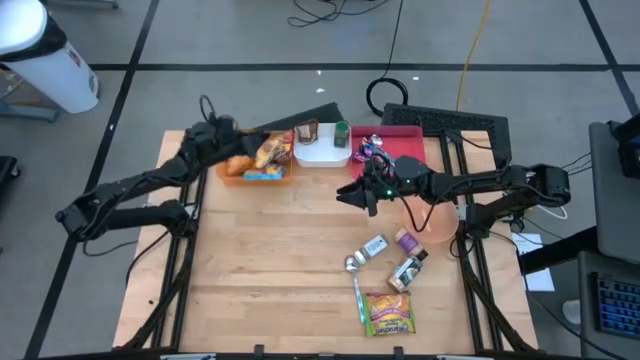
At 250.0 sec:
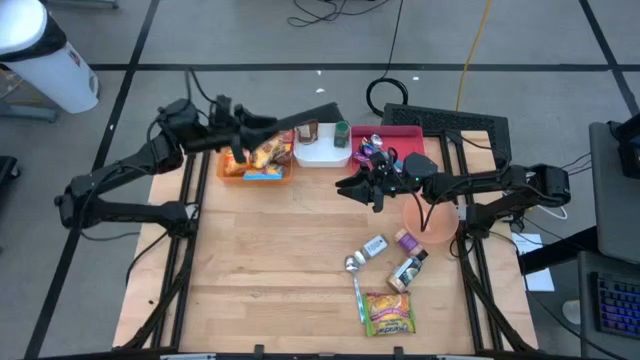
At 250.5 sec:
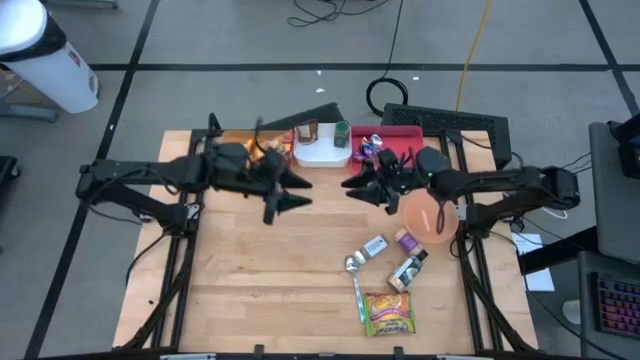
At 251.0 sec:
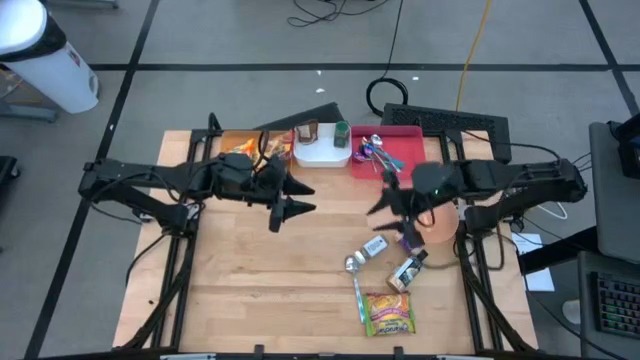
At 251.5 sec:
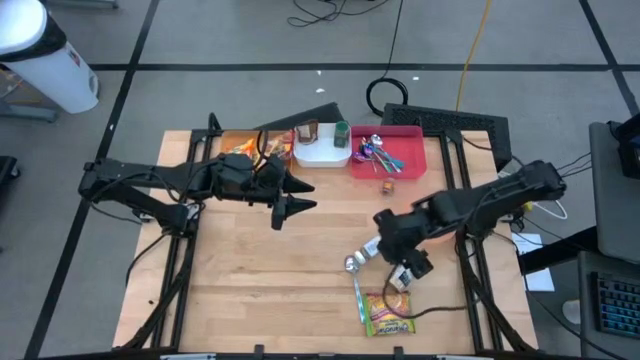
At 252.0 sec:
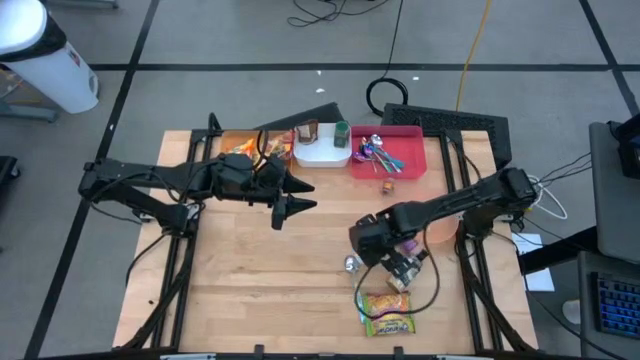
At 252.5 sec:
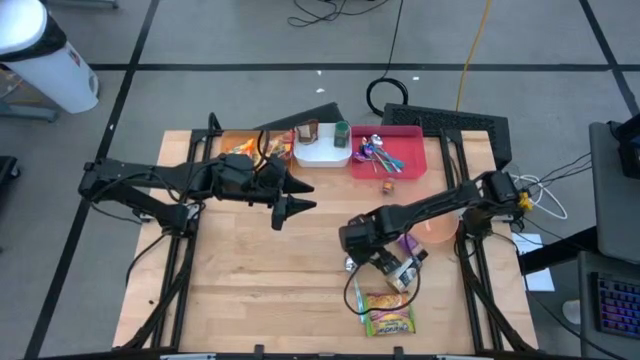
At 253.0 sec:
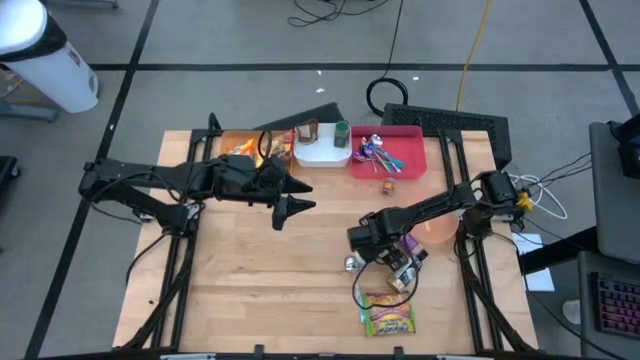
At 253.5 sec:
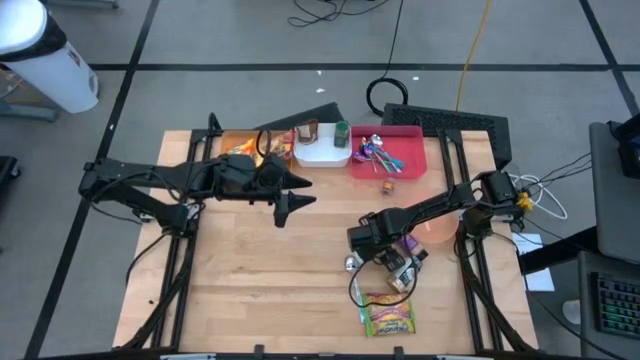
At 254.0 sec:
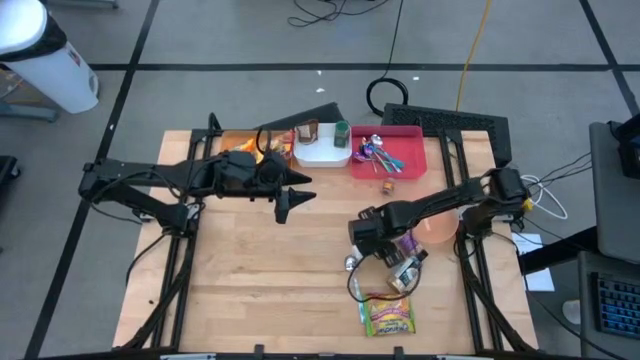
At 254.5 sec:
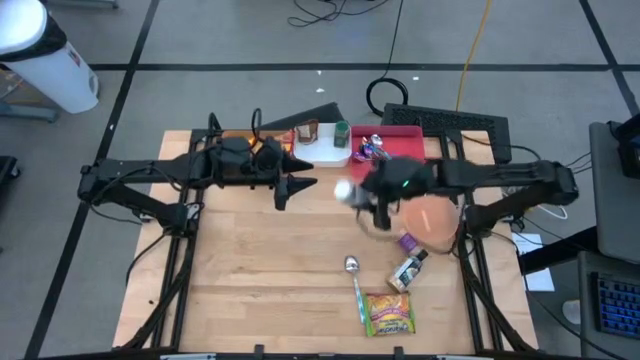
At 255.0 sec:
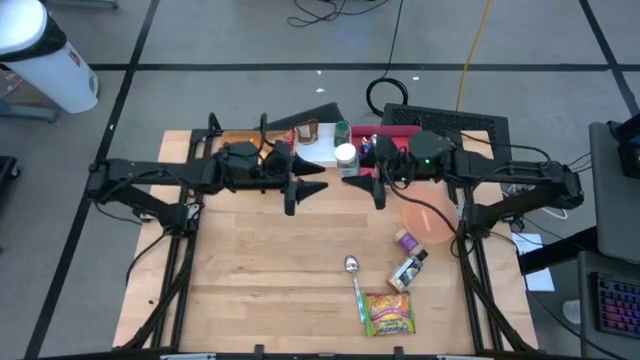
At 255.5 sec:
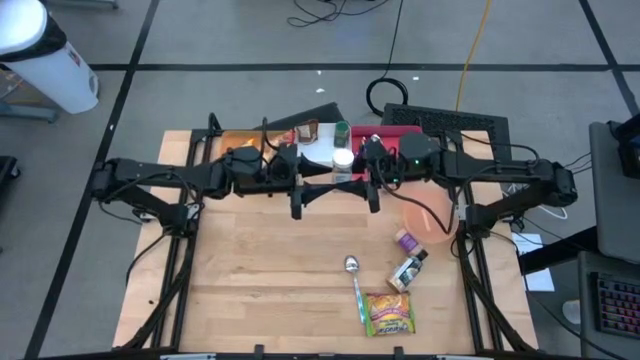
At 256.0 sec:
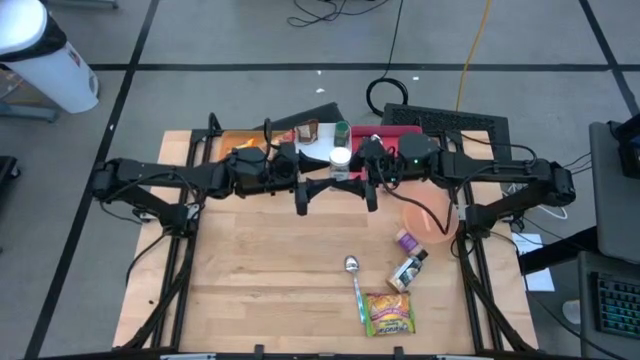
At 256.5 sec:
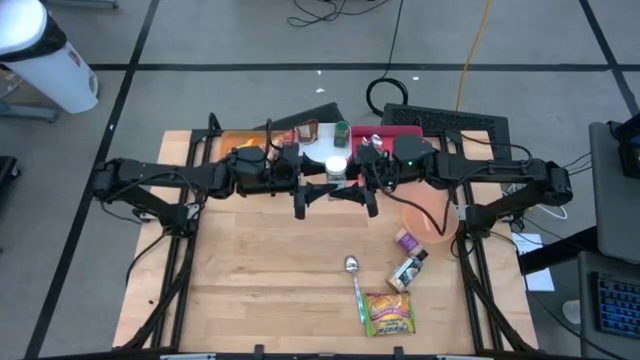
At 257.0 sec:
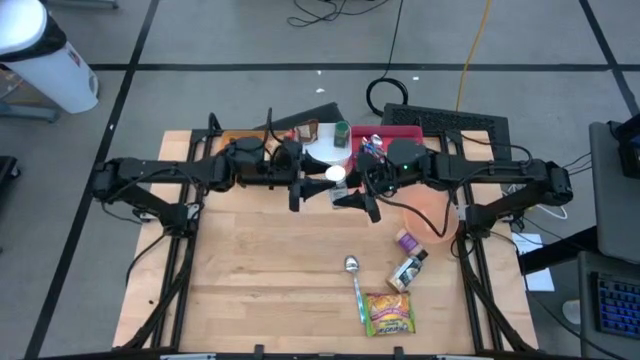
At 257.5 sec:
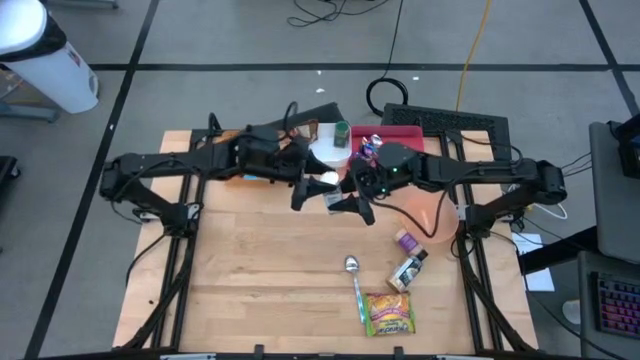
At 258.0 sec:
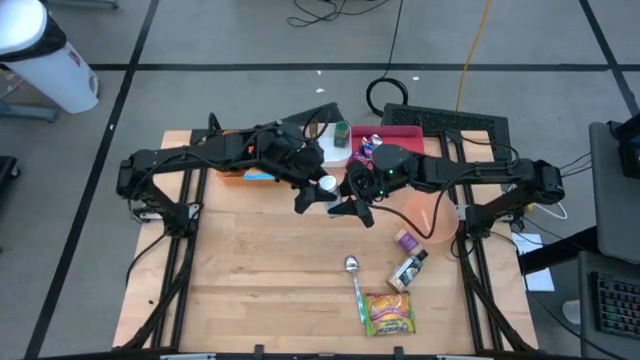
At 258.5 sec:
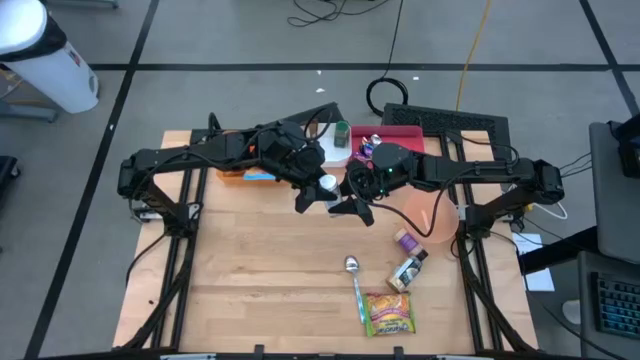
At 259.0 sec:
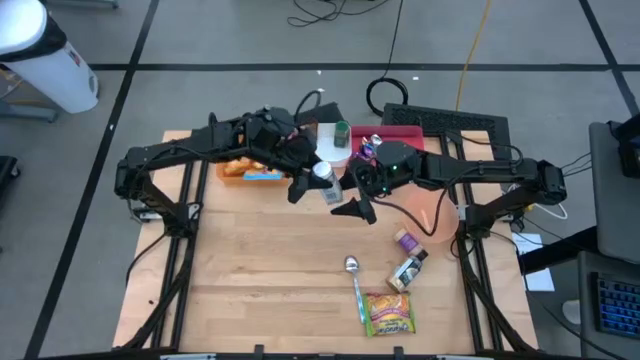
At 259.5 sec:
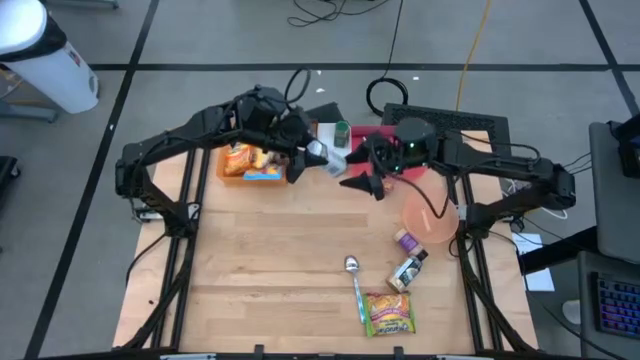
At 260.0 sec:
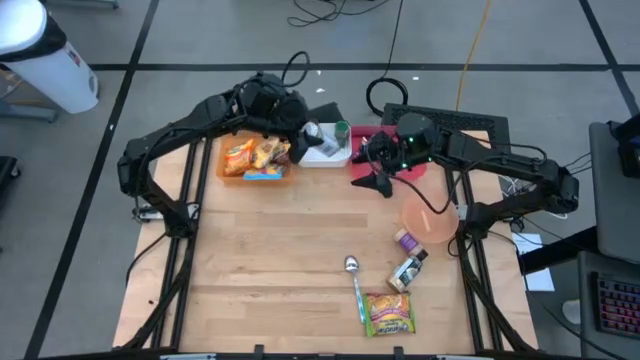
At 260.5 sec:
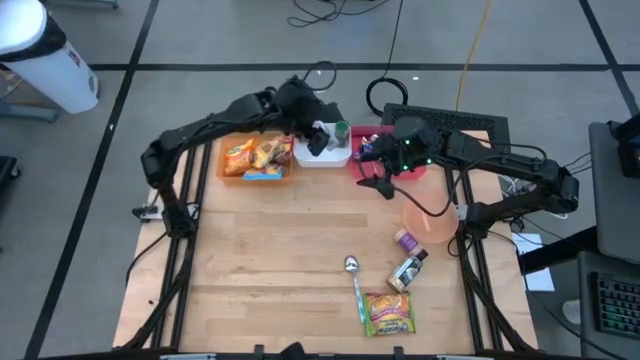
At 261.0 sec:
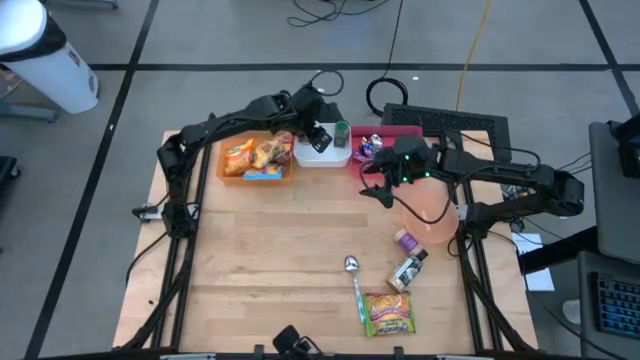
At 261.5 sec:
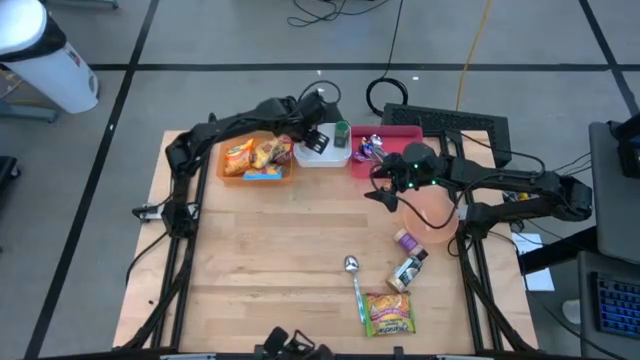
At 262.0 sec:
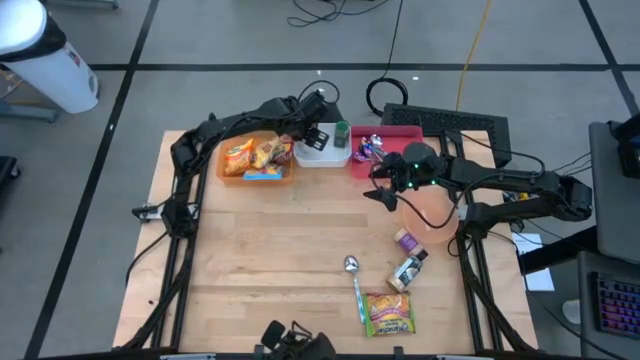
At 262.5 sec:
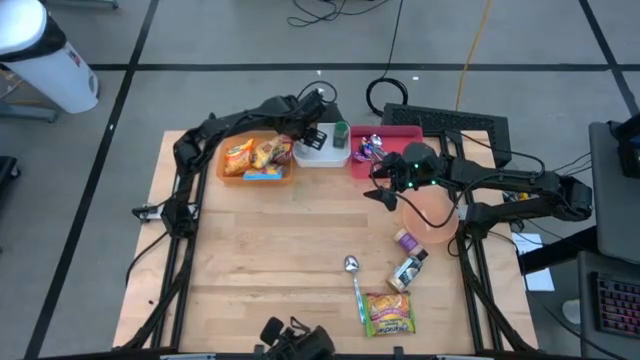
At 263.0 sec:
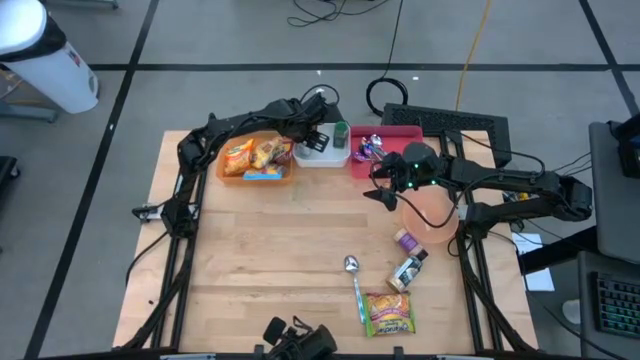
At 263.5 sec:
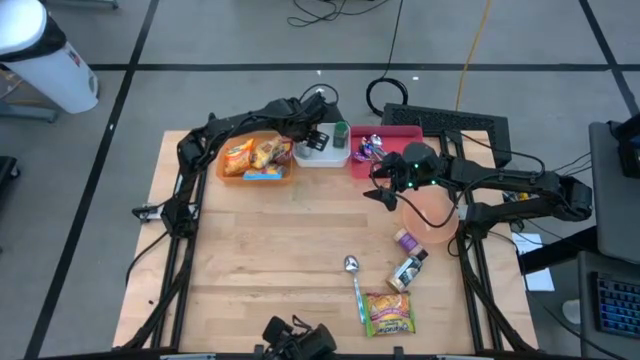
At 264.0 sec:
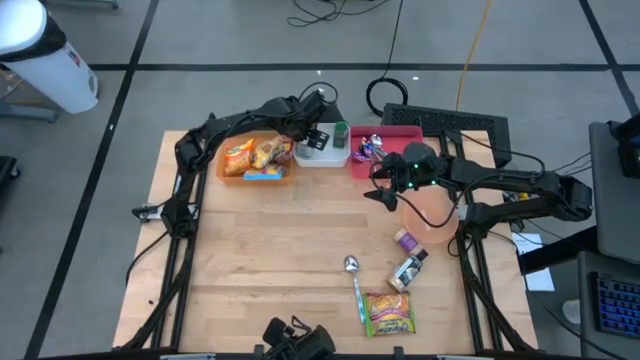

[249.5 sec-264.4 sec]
Task: Pick & Place Food Item
Put the white seasoning bottle into the white bin
